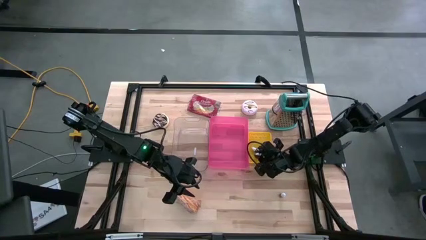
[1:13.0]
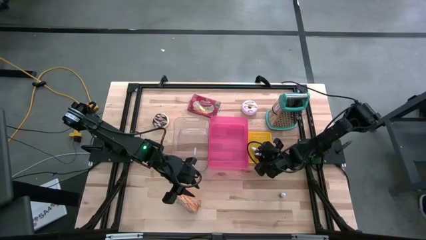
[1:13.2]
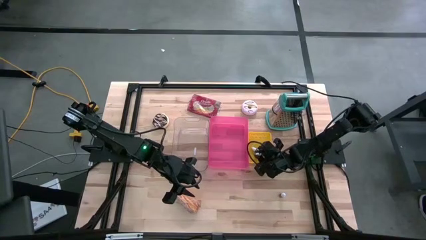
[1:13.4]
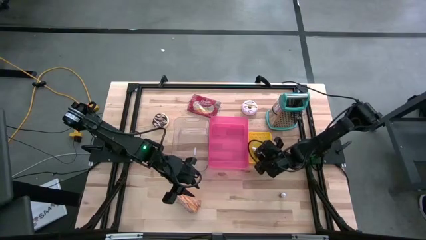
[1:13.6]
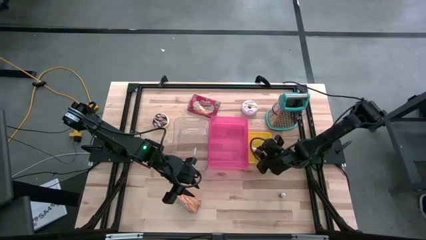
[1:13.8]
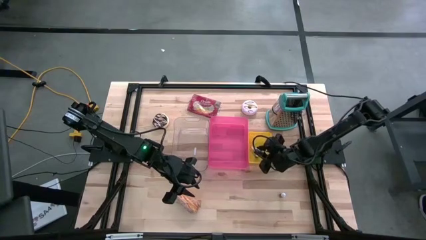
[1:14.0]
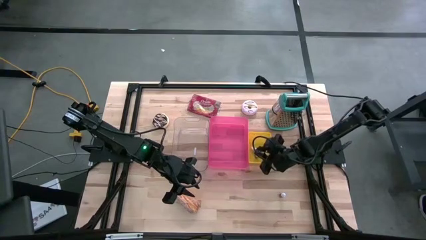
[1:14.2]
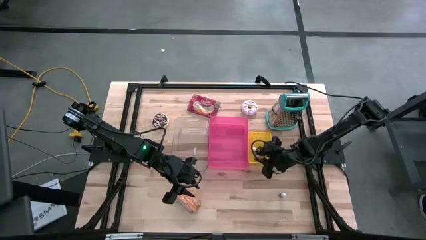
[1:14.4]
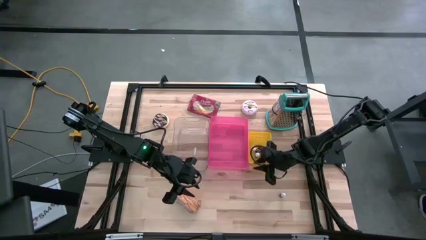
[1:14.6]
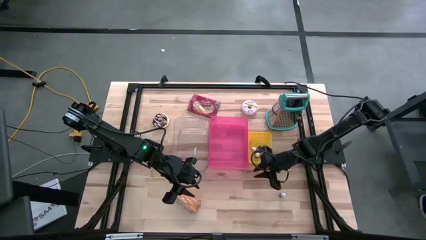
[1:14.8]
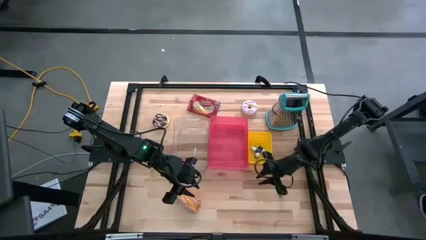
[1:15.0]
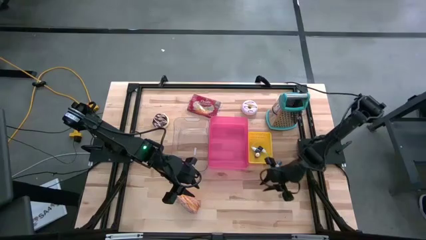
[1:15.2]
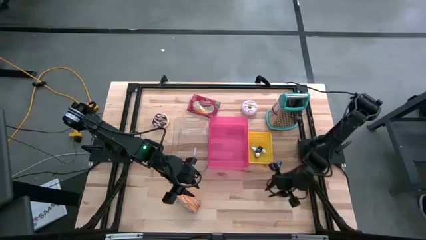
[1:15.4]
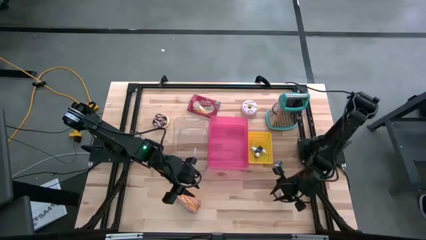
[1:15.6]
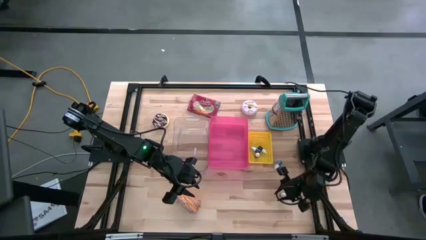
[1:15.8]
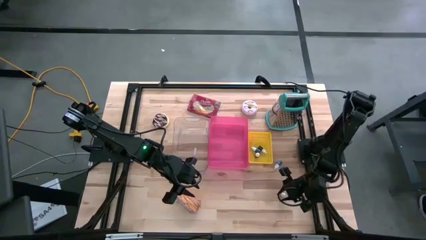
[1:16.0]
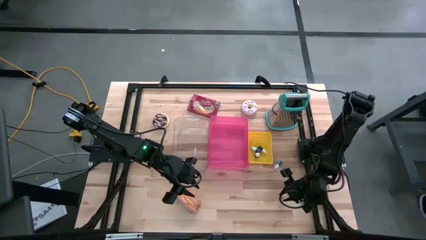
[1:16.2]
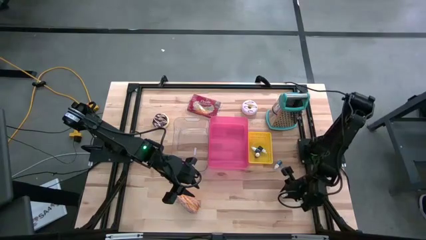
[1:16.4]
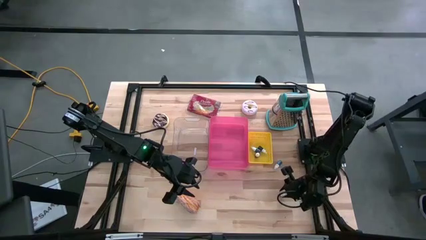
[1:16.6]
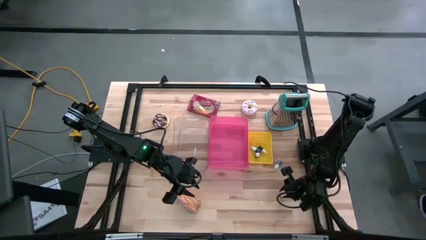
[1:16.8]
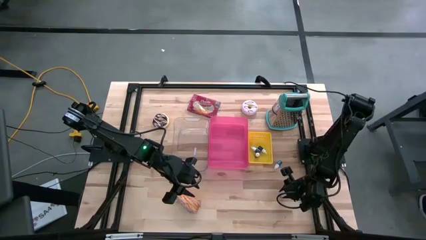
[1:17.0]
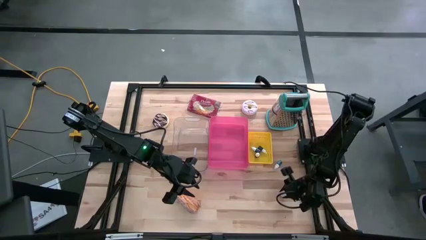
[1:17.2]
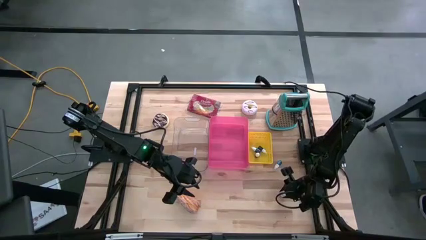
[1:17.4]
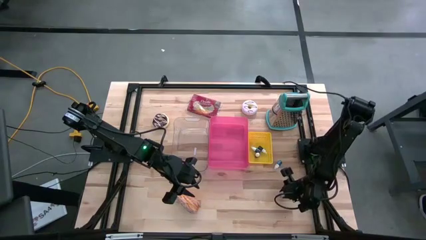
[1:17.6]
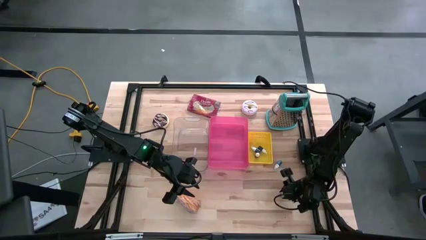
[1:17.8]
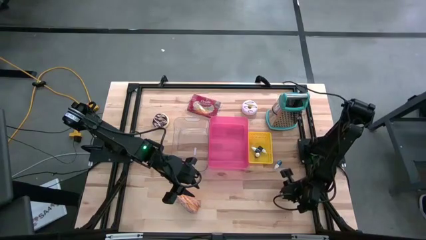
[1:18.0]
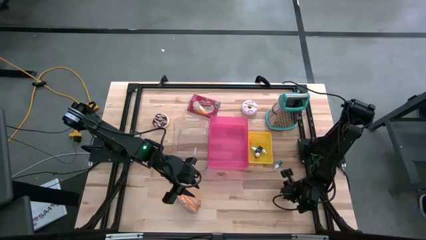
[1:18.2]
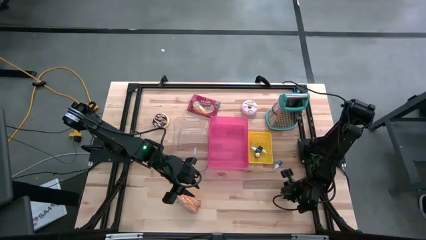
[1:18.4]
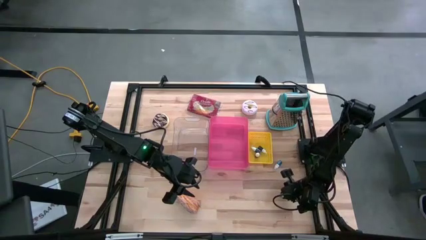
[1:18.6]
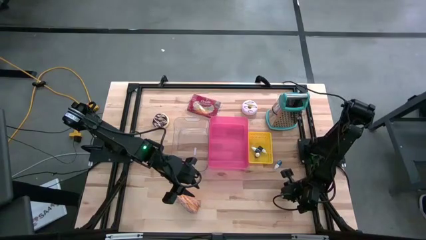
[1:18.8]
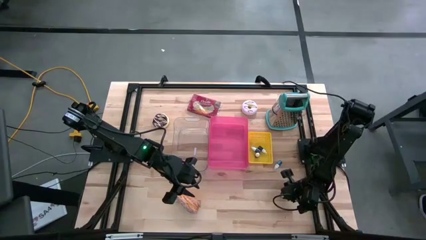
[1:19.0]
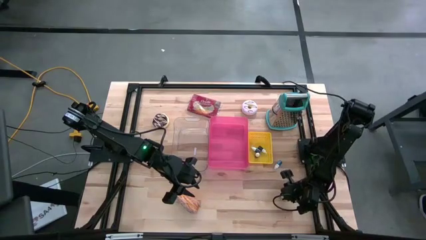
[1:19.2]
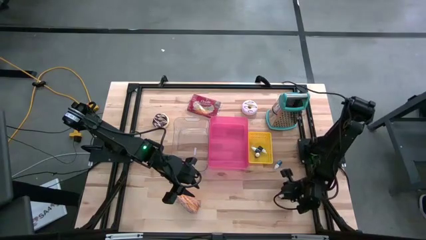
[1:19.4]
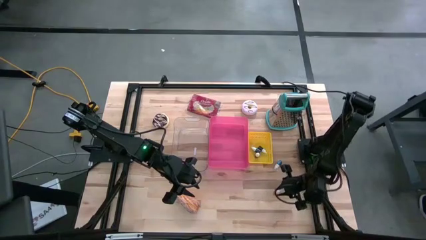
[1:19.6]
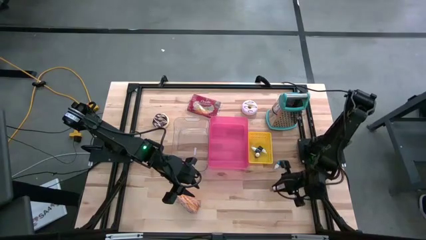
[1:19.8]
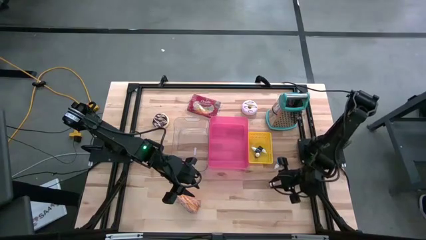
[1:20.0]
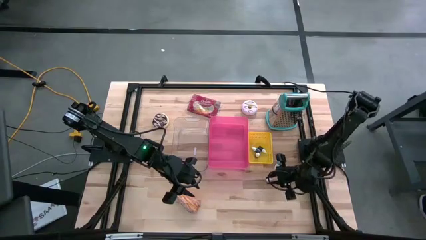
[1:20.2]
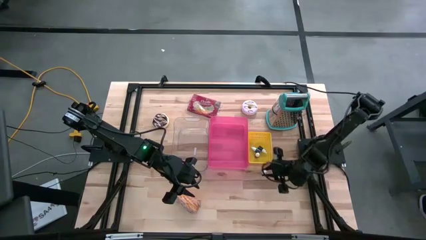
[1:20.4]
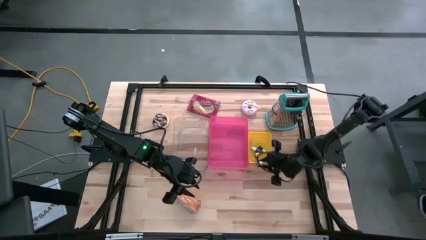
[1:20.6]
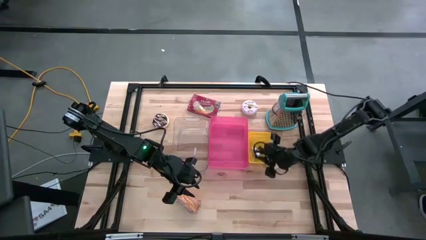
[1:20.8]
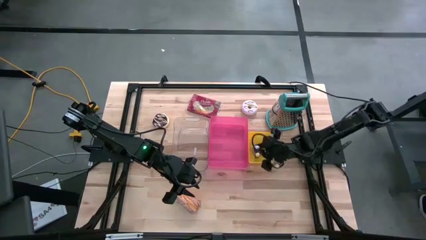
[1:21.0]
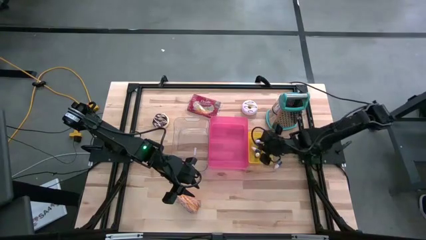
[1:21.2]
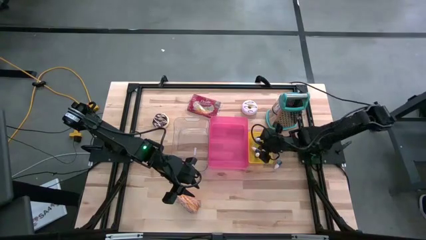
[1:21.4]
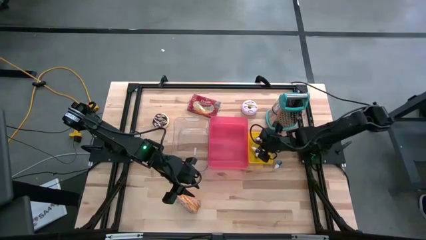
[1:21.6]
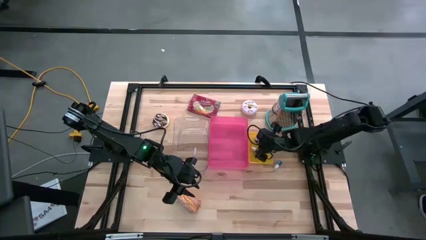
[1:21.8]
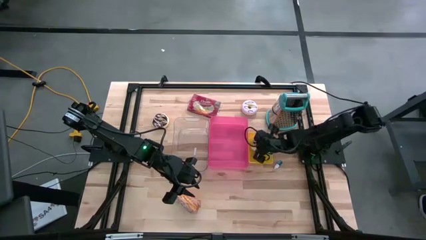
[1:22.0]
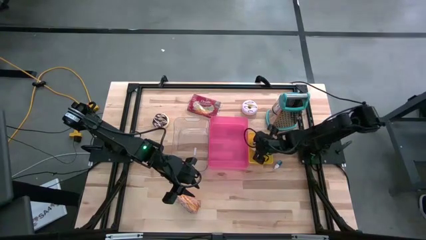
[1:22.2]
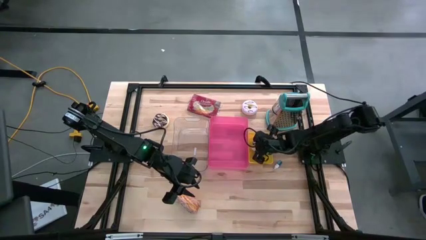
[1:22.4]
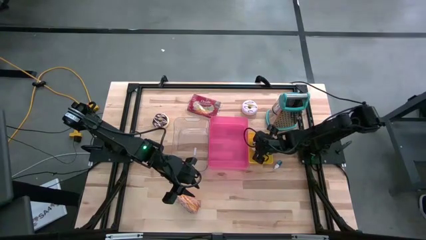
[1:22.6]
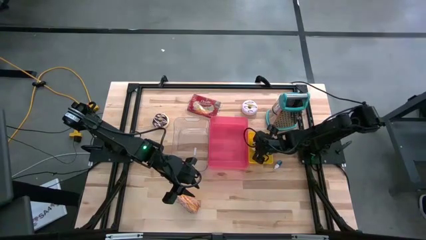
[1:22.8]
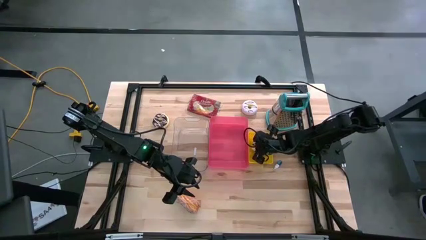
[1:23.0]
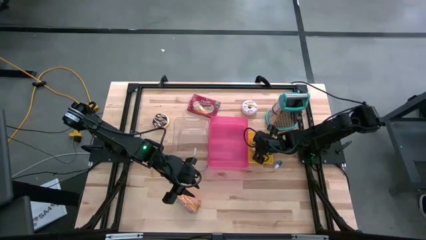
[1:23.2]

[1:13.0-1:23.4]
Put the brown food coloring bottle into the yellow bin
